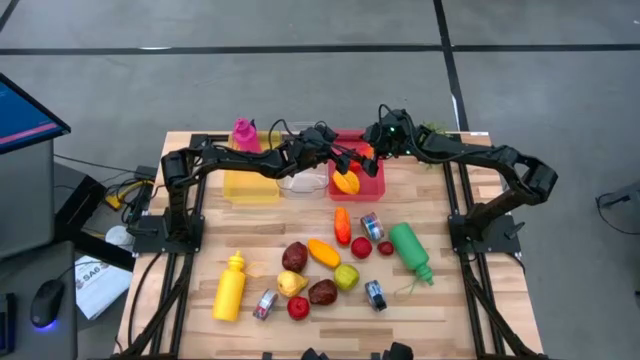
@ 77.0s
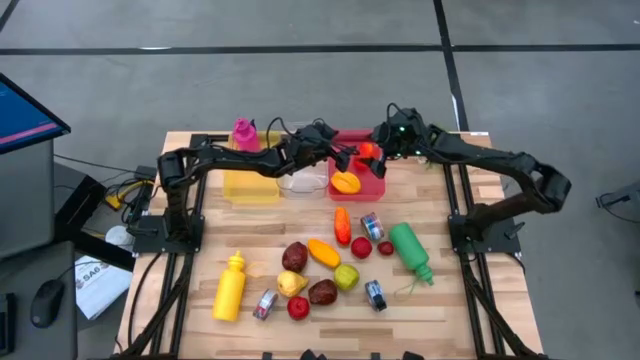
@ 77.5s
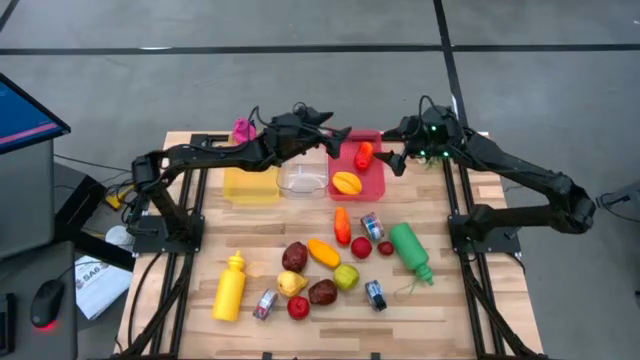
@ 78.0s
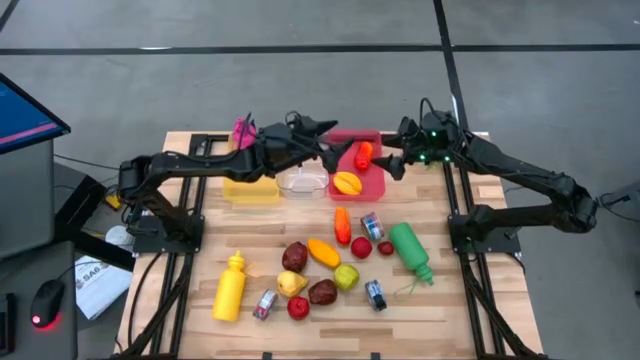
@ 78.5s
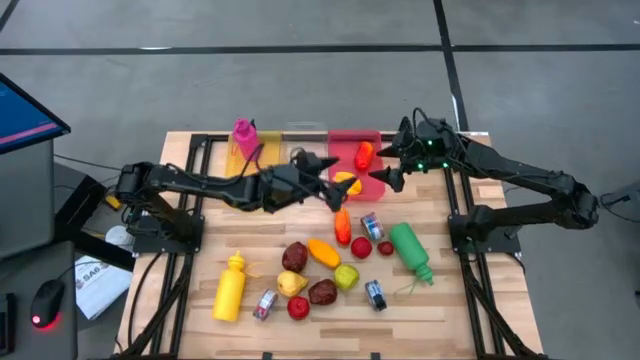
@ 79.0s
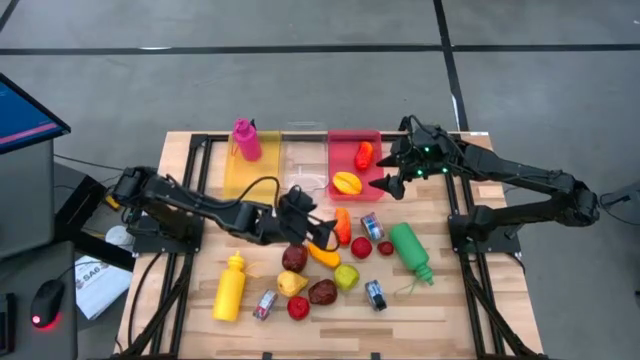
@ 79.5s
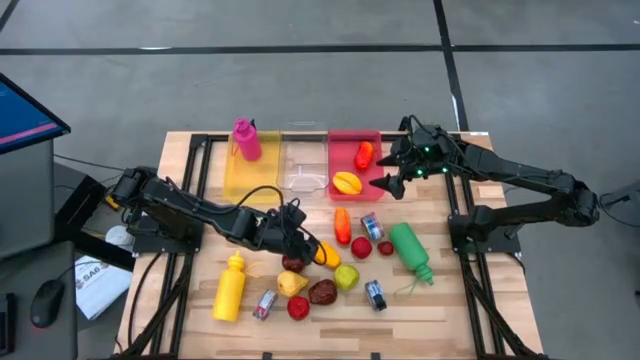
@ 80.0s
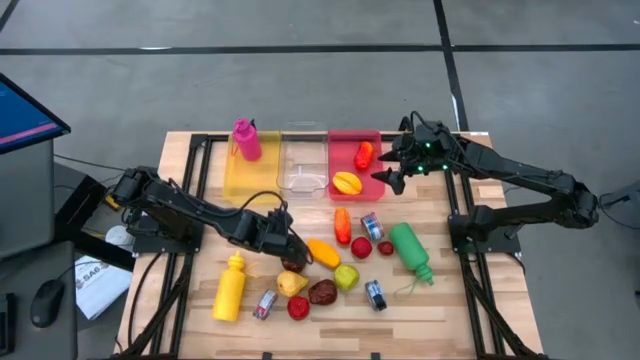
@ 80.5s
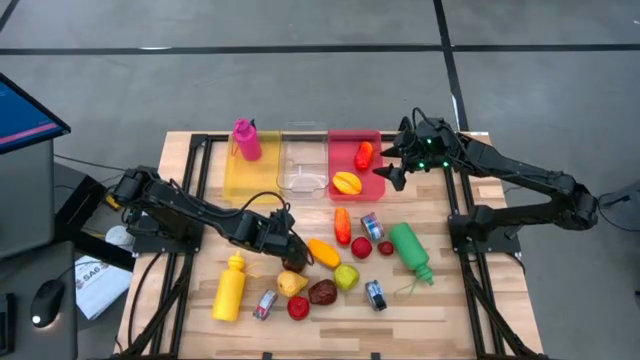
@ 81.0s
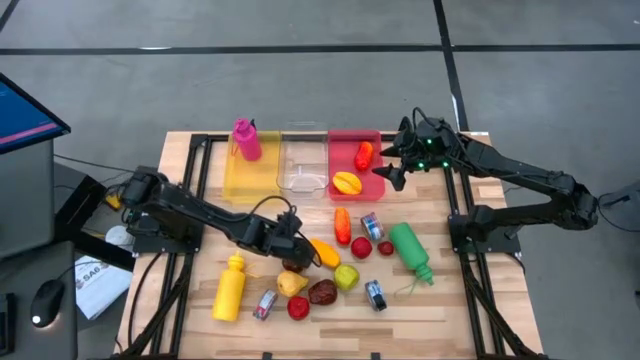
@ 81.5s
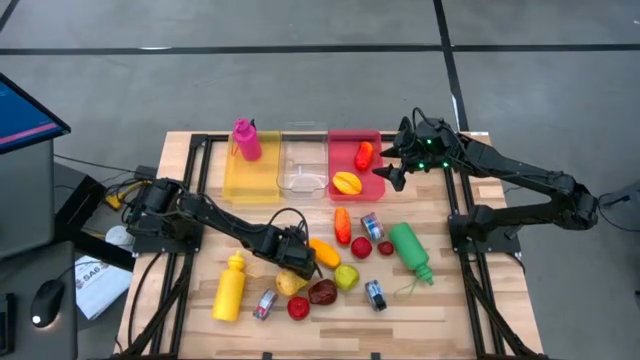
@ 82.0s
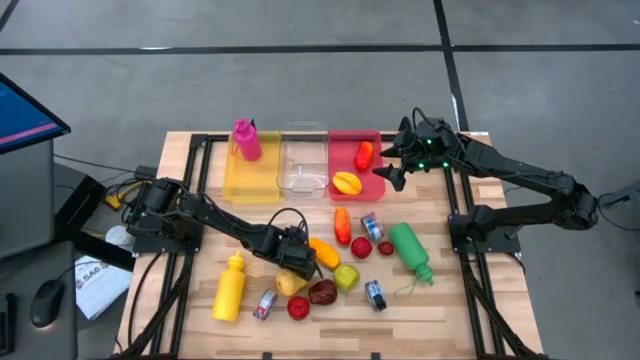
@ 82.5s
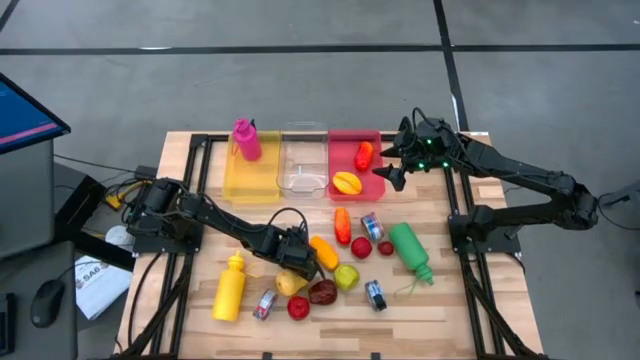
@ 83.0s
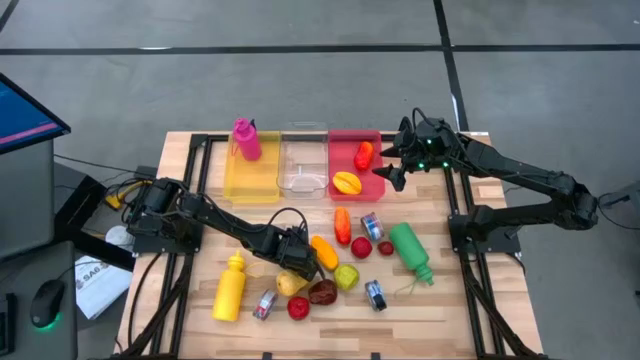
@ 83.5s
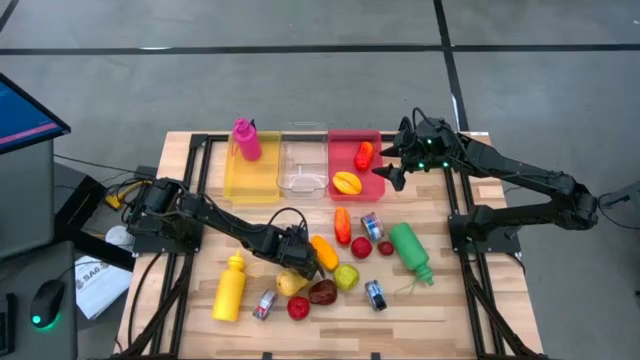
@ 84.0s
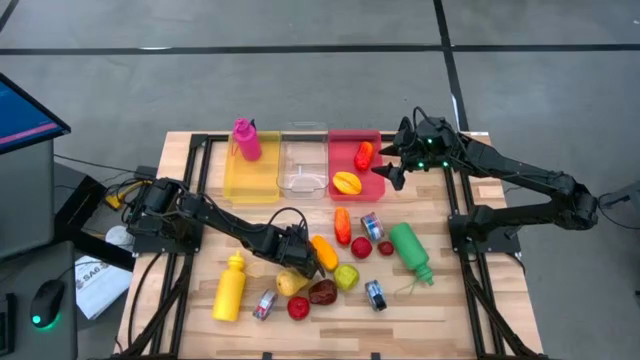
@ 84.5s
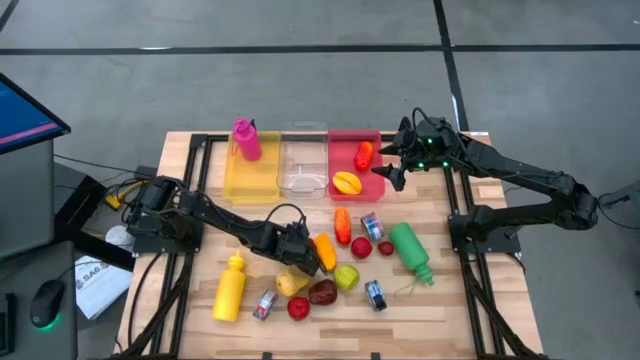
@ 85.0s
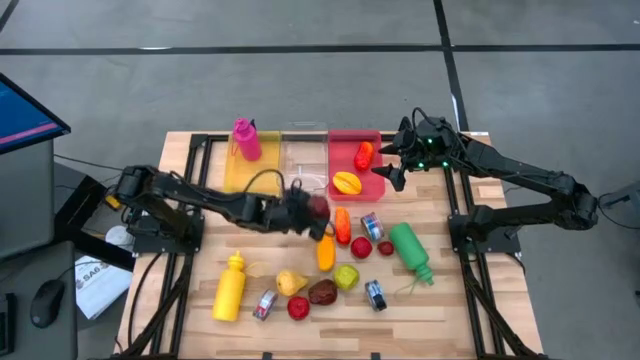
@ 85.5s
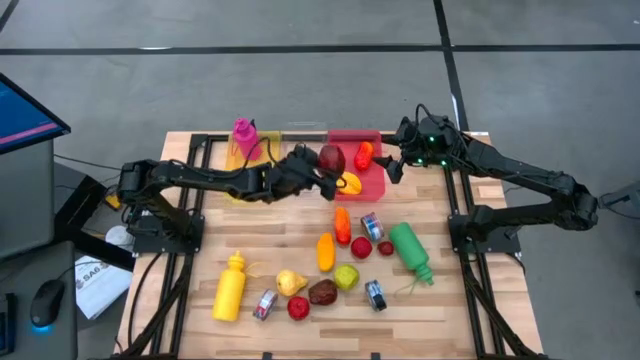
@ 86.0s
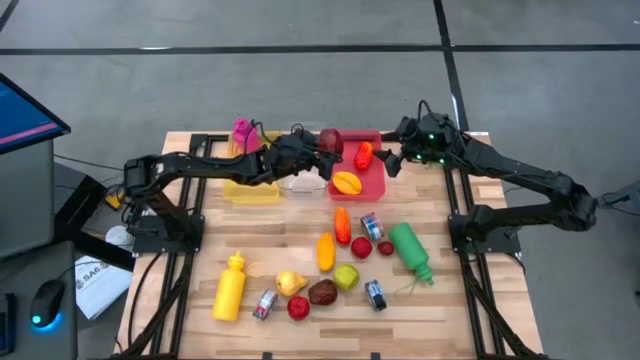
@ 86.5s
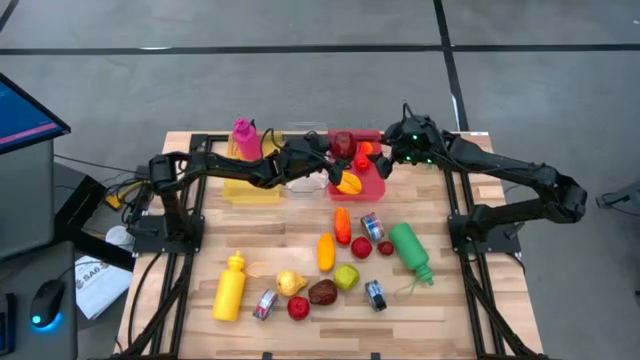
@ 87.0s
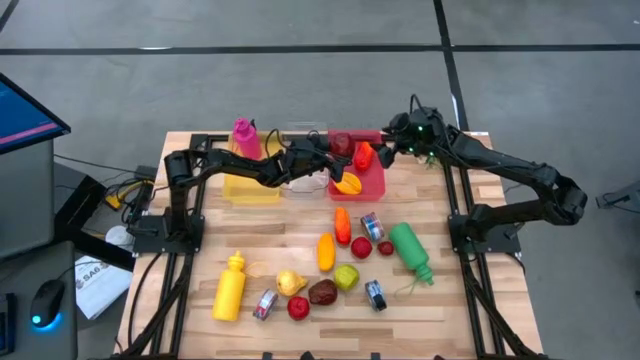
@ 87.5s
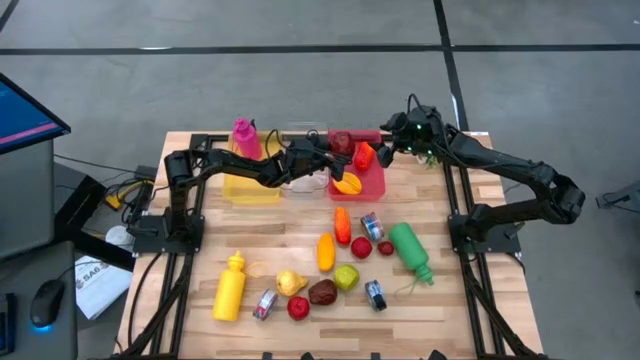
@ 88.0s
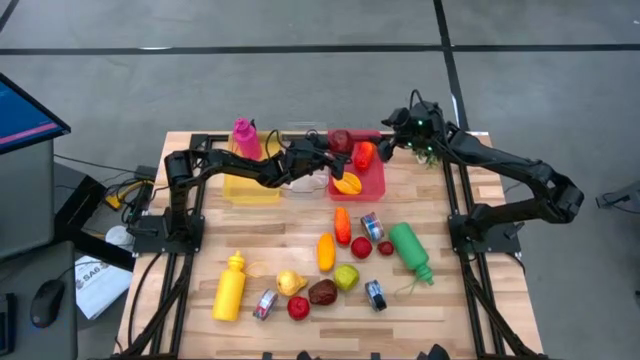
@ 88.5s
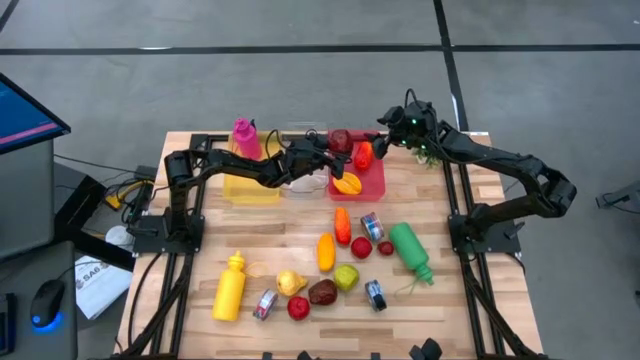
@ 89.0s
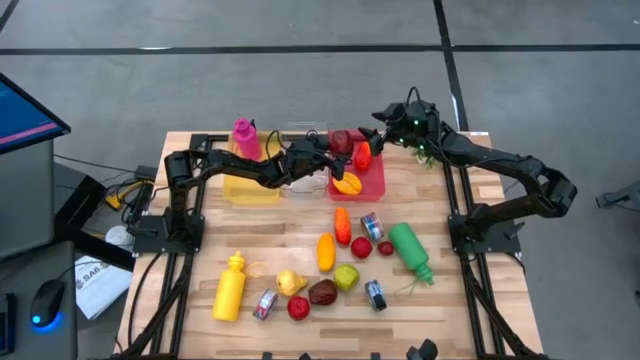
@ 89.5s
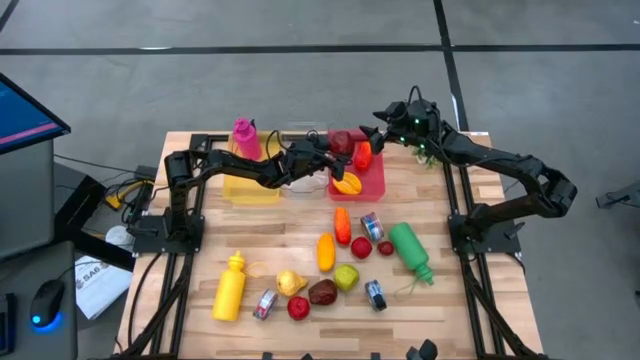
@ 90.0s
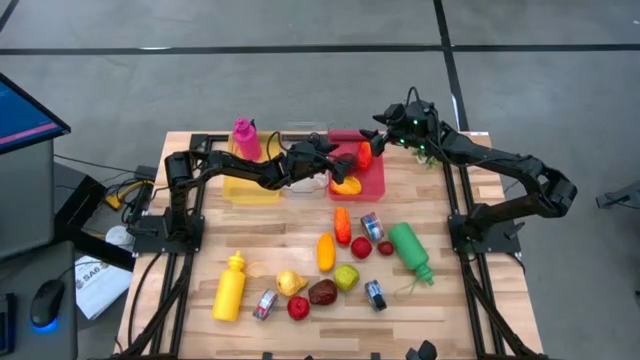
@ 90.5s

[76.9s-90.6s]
Task: Pick & Place Food Item
Put the red apple into the pink bin

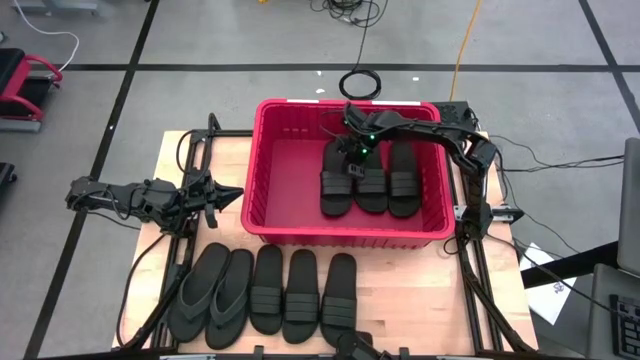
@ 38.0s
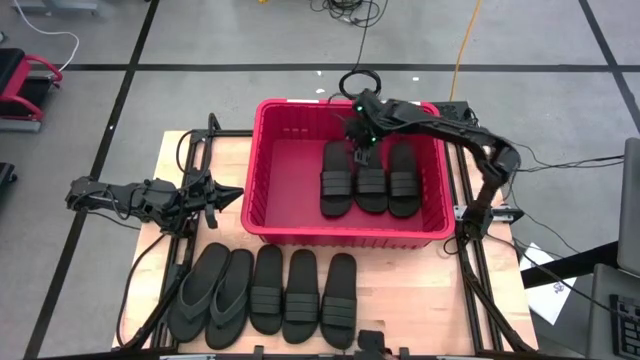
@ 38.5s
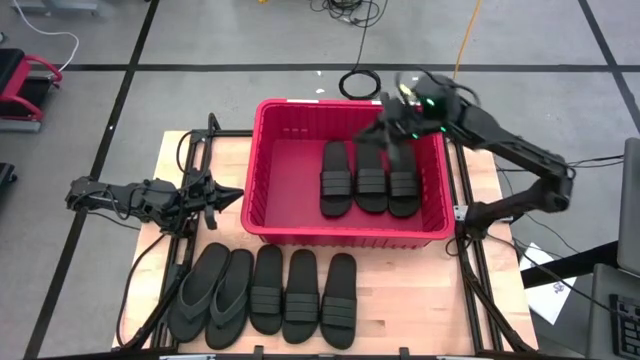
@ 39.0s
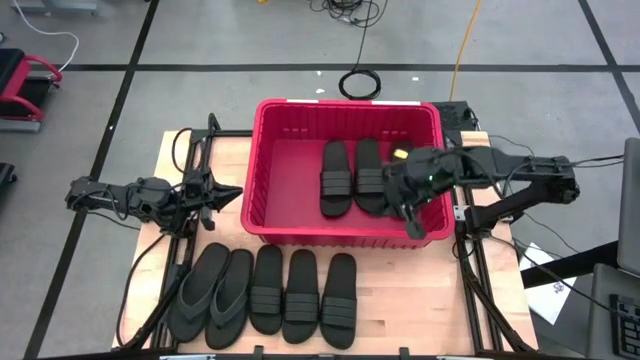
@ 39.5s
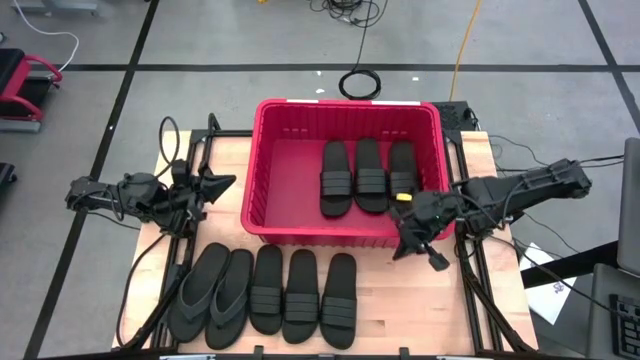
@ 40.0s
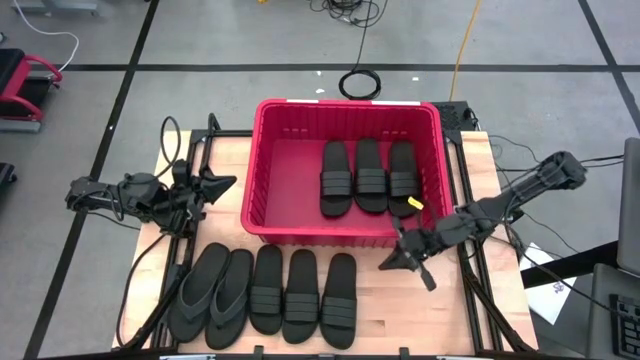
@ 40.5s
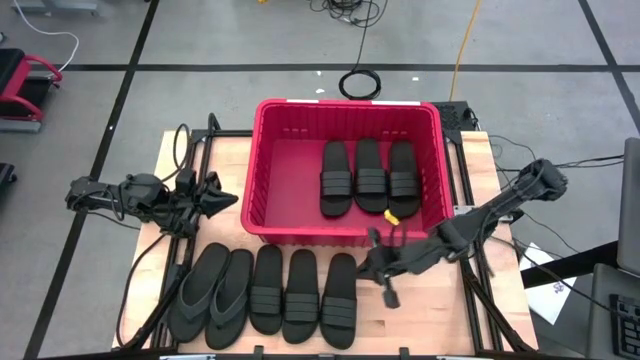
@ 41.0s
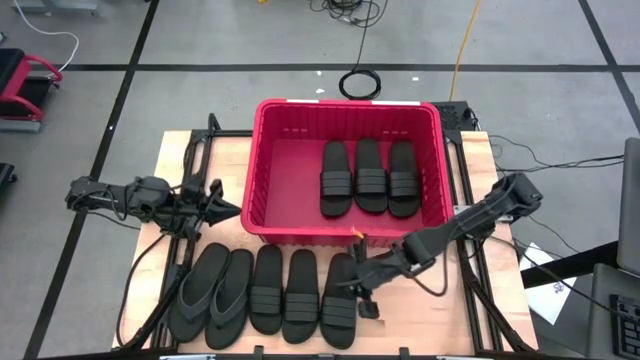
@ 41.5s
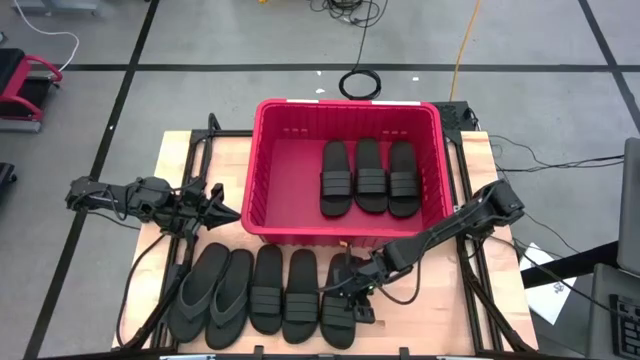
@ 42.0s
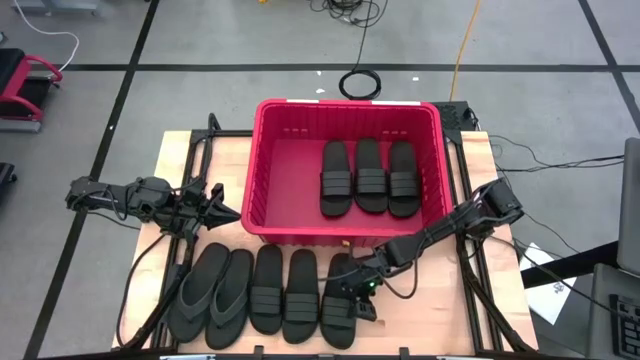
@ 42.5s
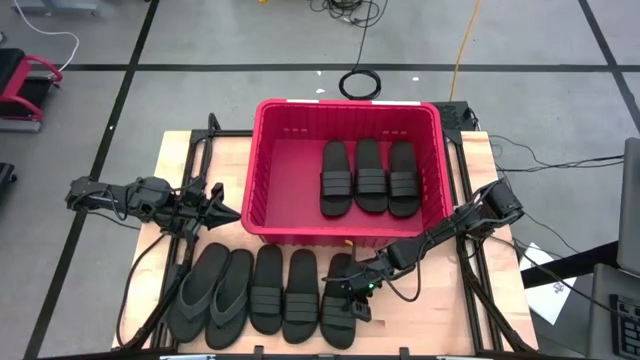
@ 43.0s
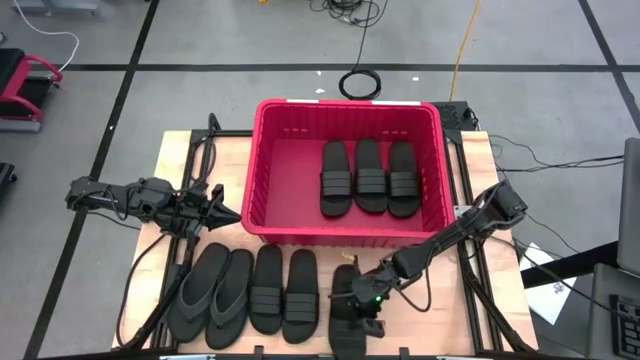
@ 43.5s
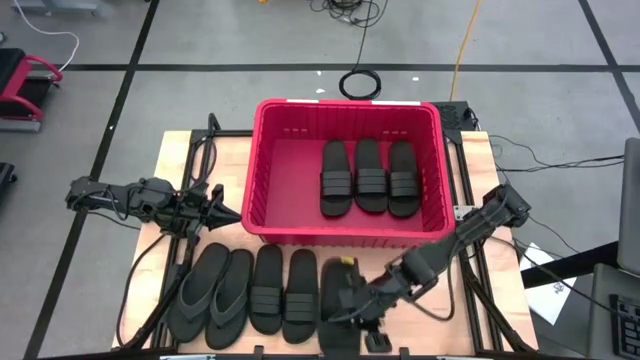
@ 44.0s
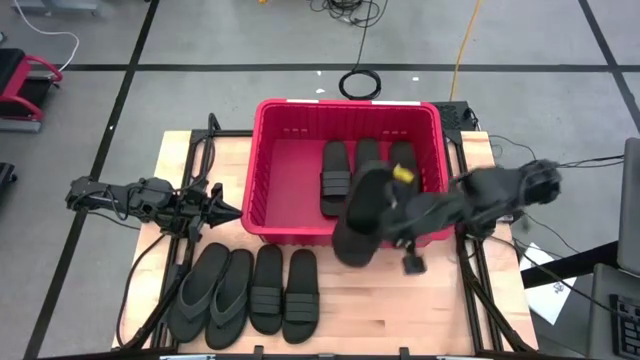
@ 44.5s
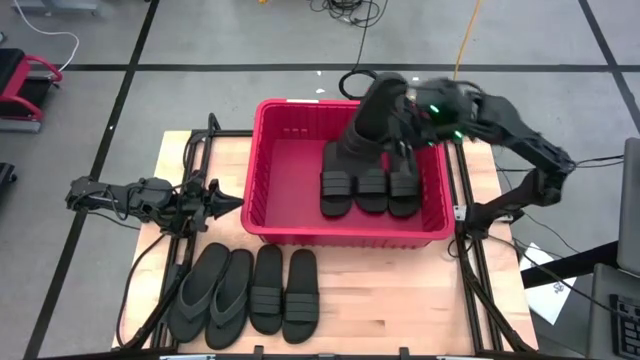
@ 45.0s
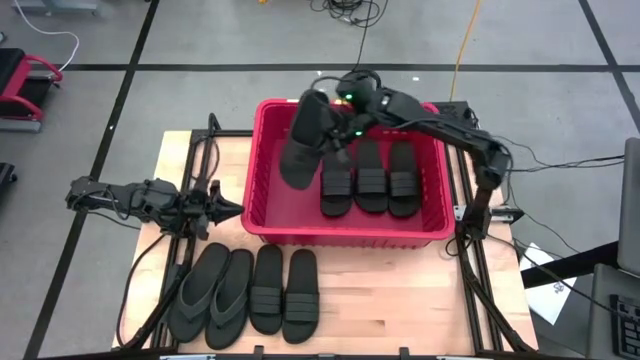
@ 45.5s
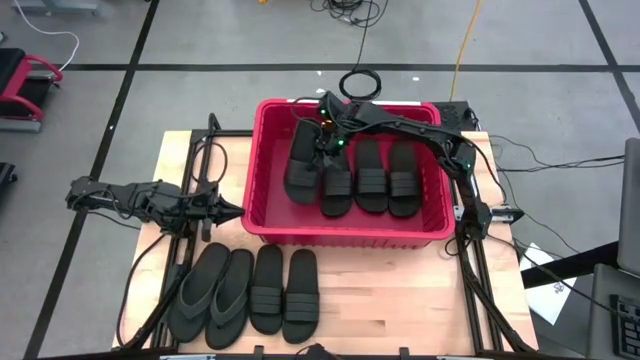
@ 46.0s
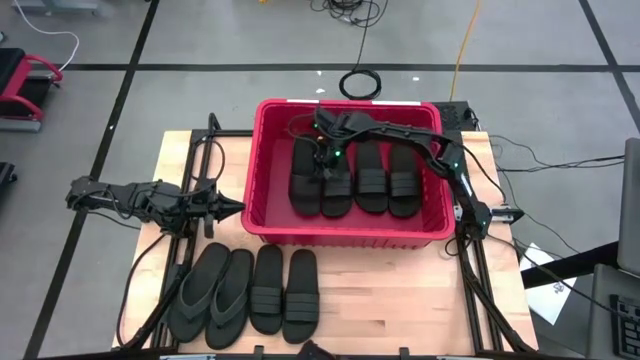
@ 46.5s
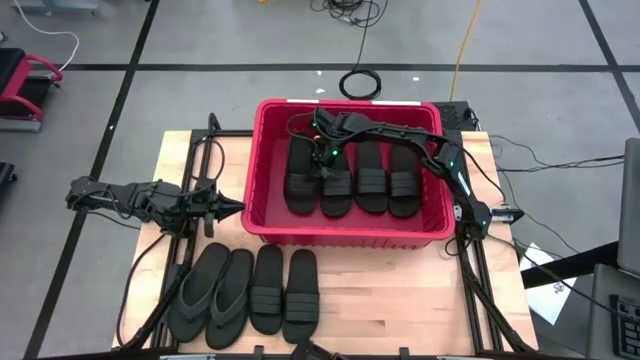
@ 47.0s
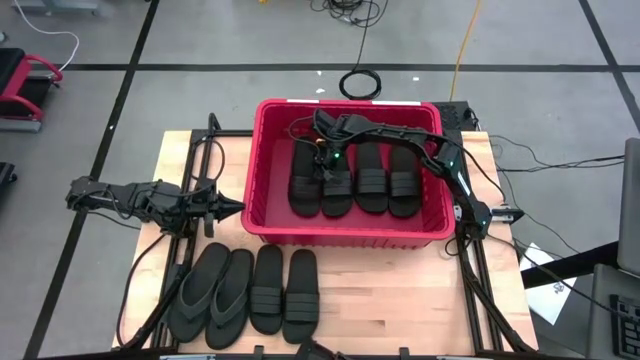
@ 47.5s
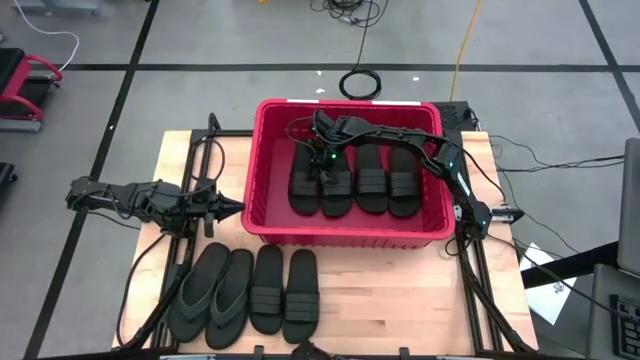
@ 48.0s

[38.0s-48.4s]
Task: Pick and place slides into bin
Put the black slipper into the red organizer bin
